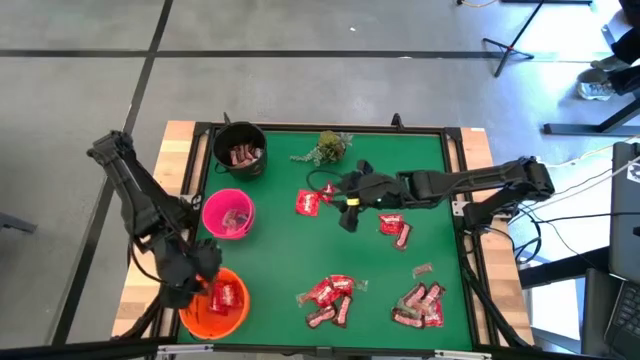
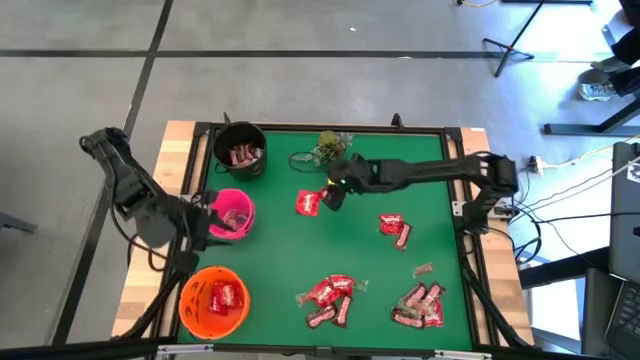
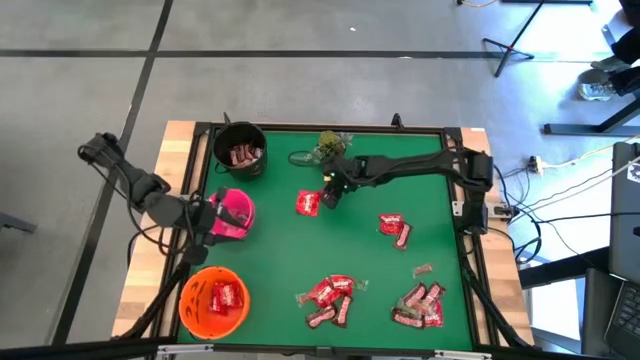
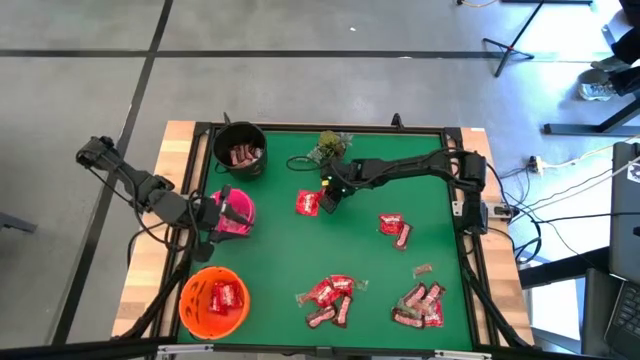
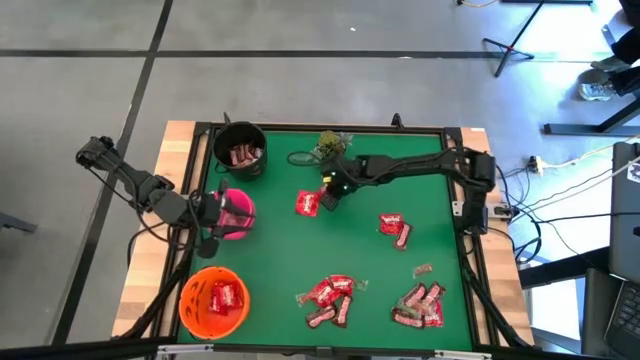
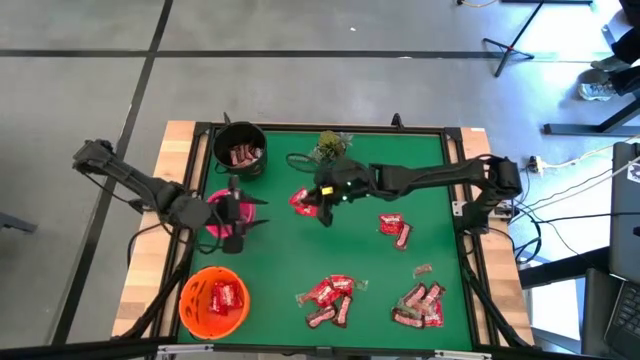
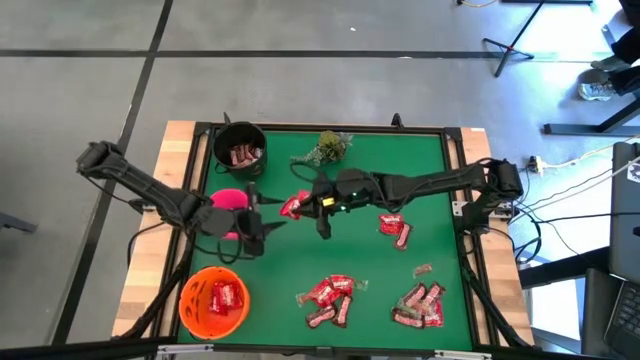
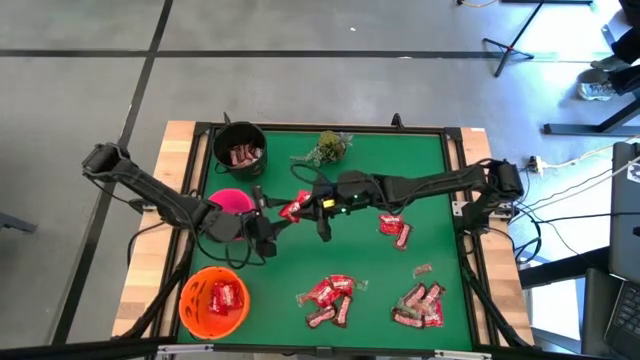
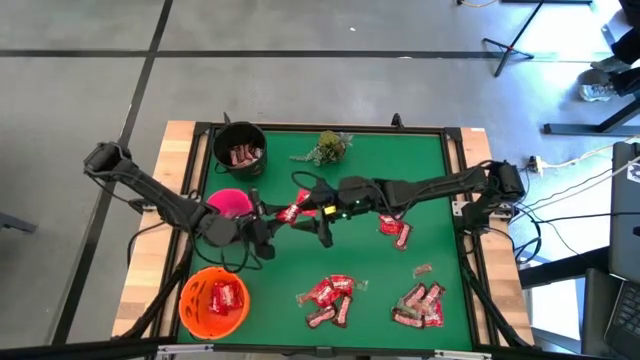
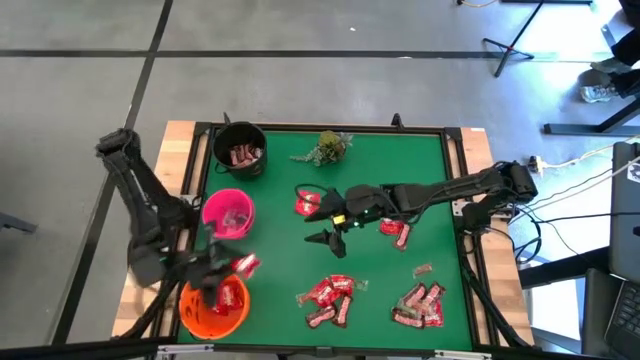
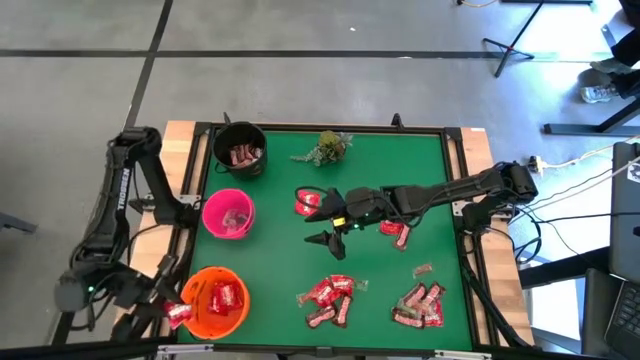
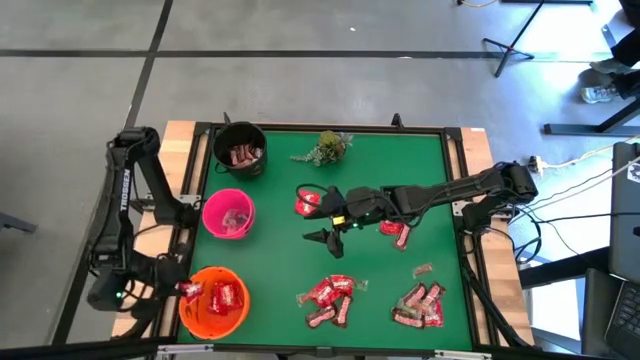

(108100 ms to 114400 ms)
Task: Sort candy
Put the red candy into the orange bucket

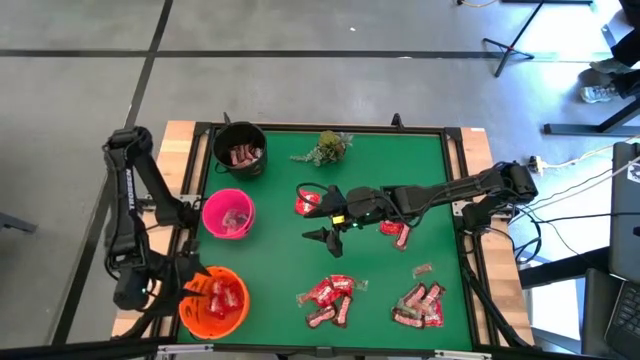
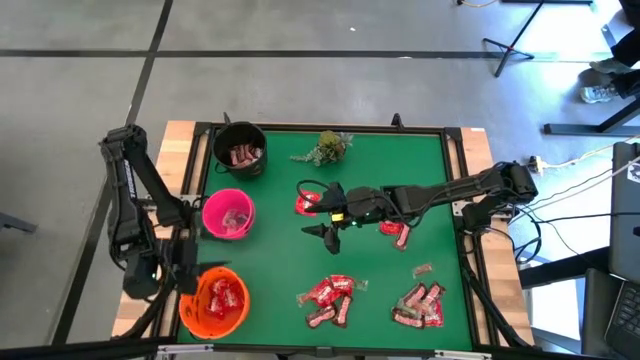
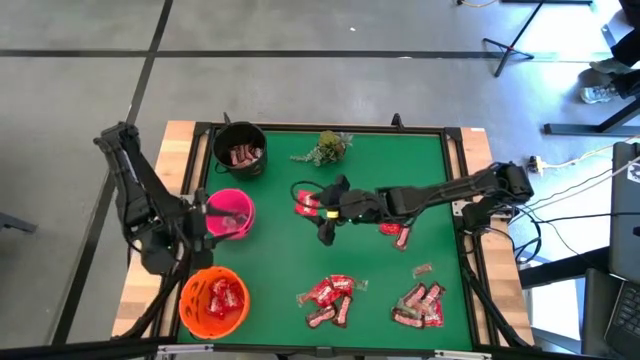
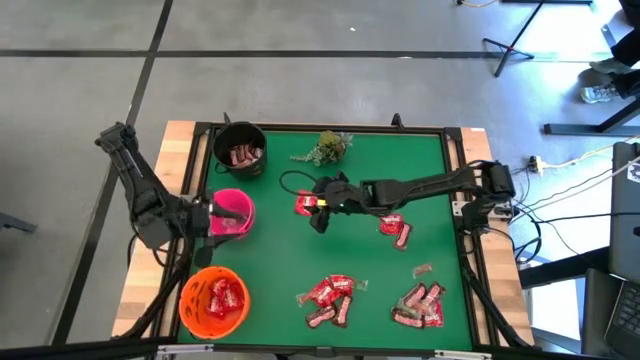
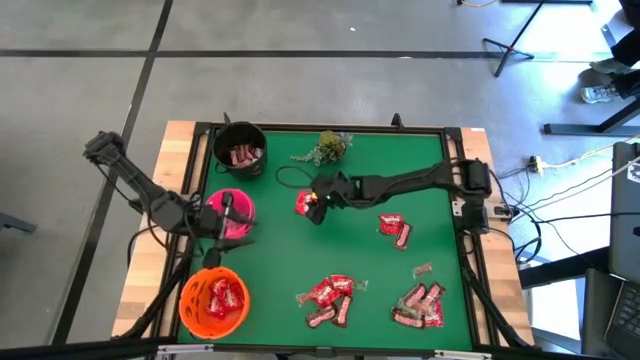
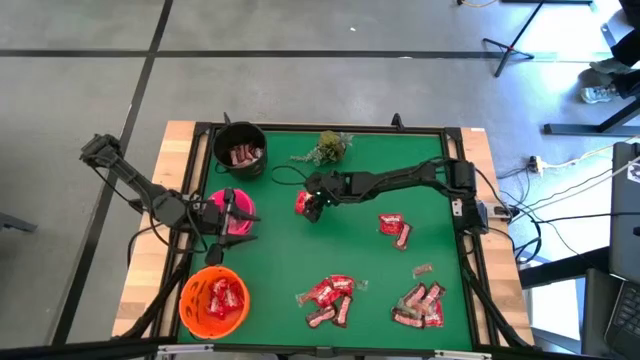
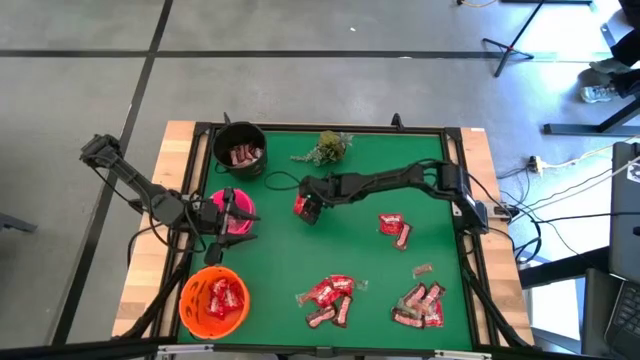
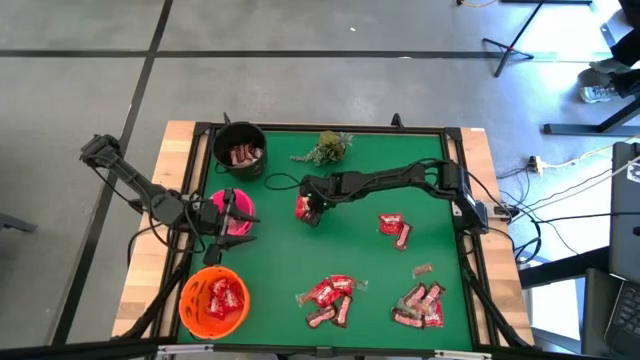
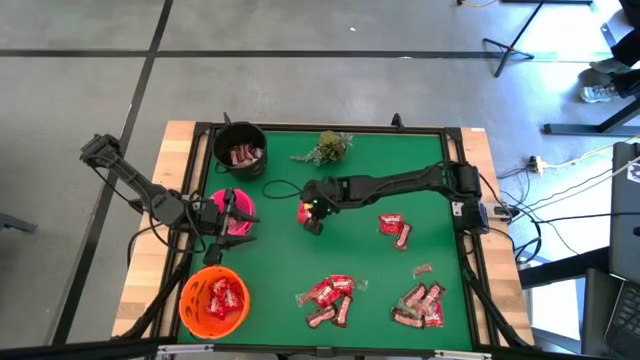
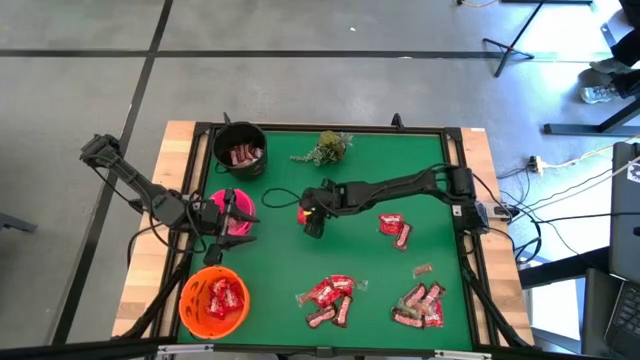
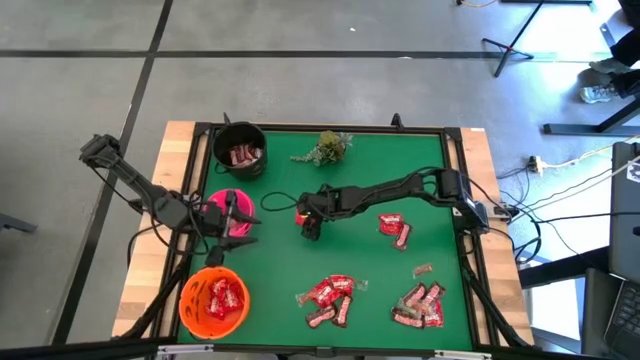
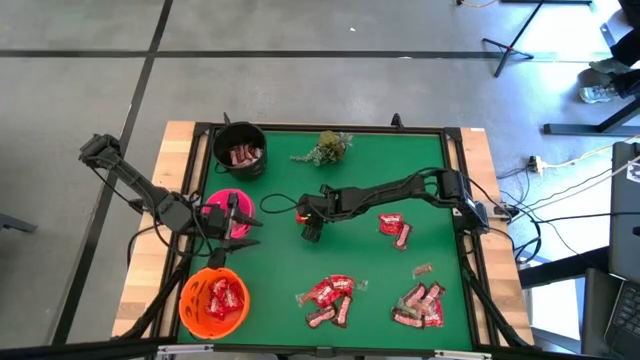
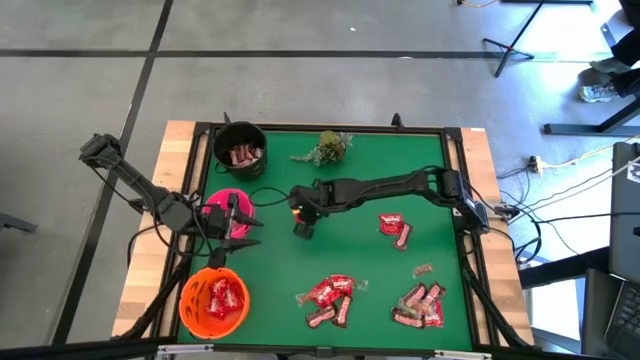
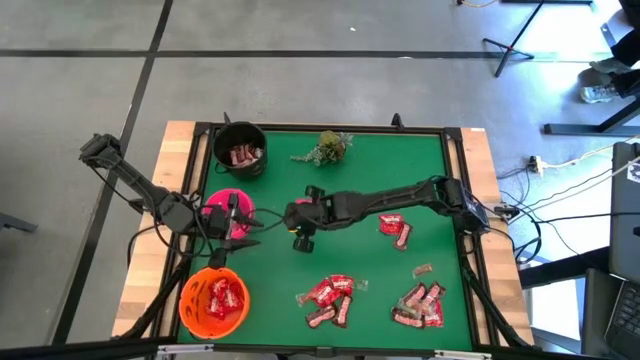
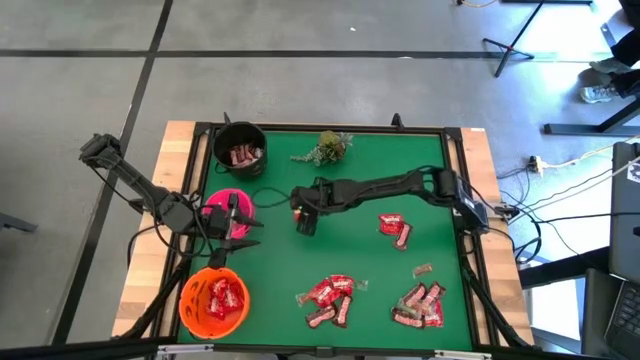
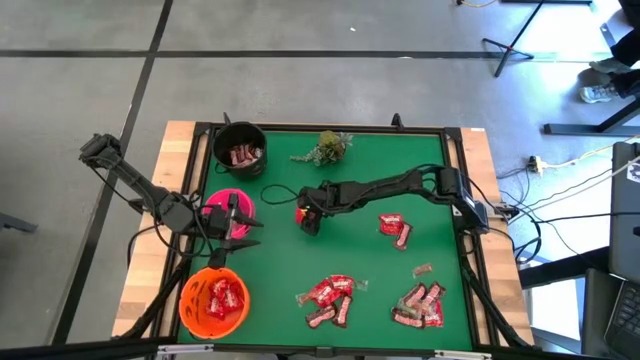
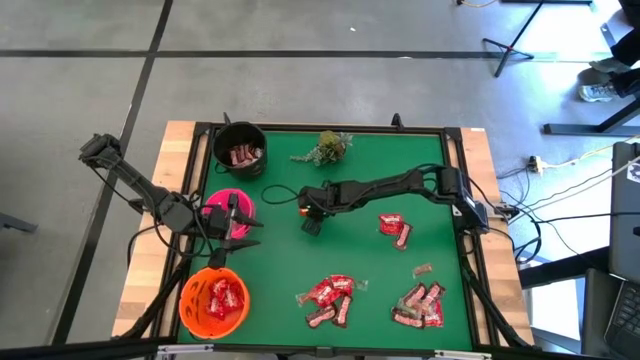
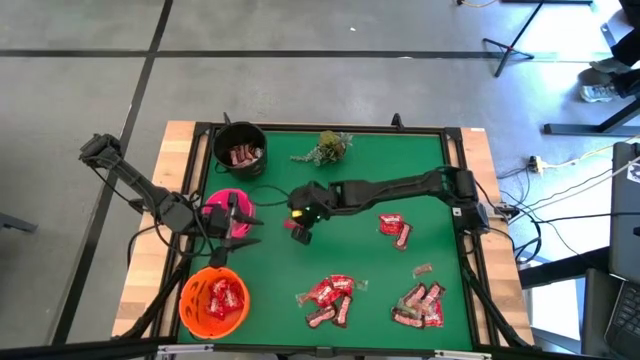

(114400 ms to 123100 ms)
Put the red candy into the orange bucket

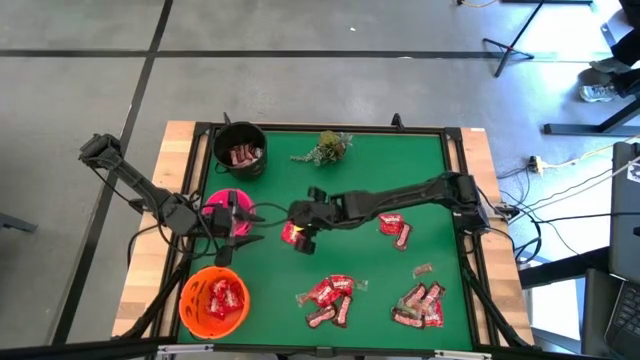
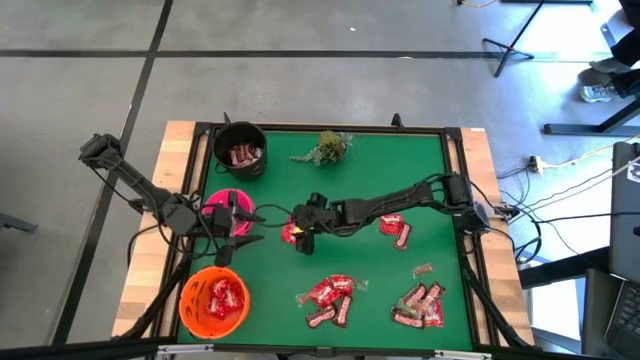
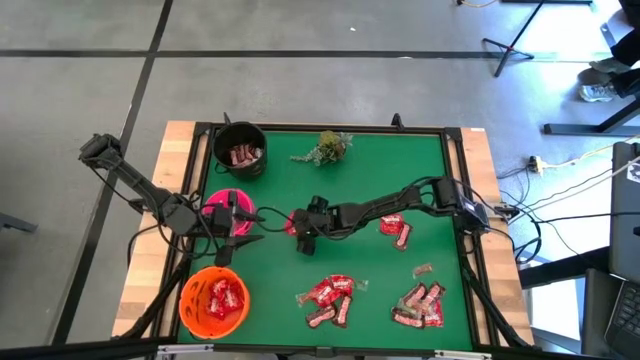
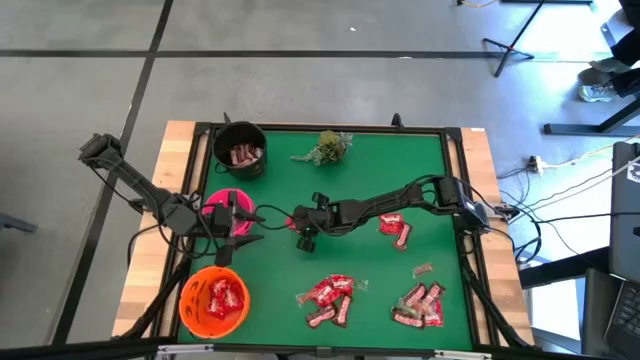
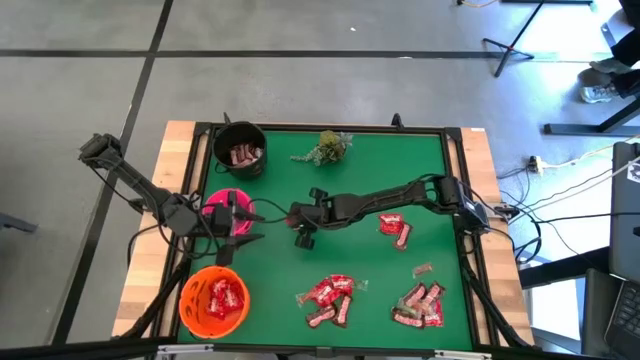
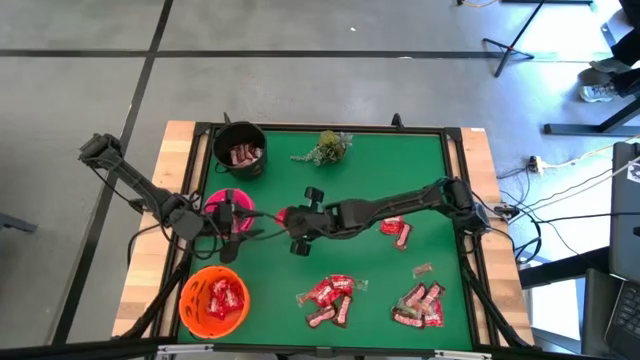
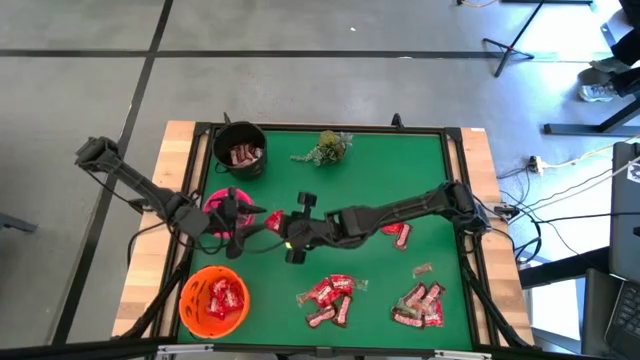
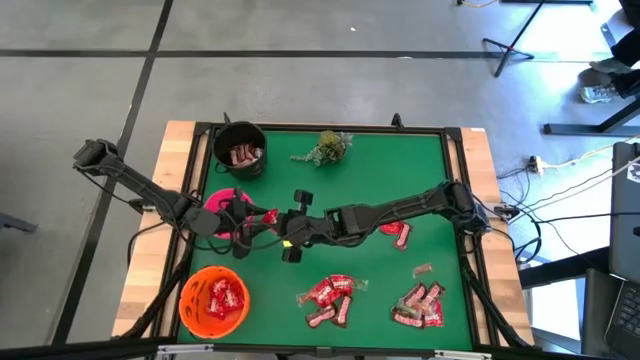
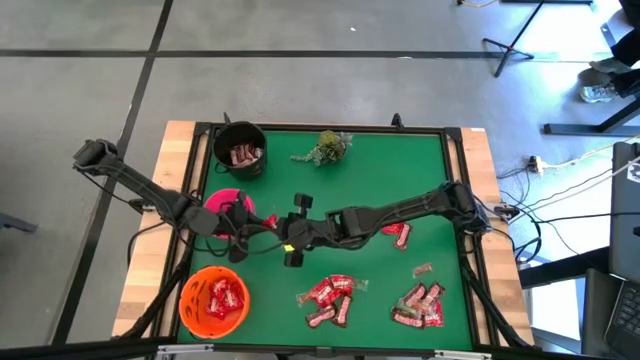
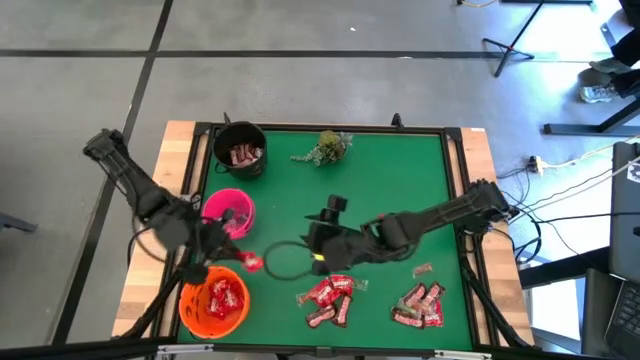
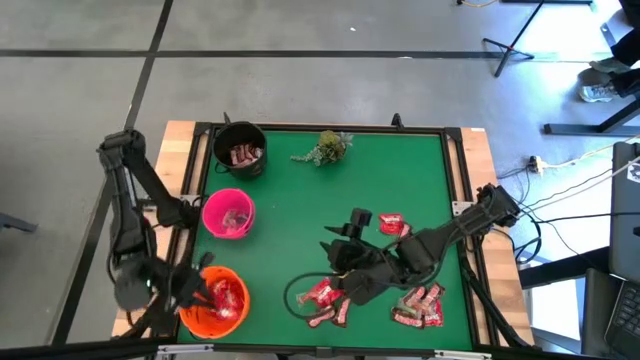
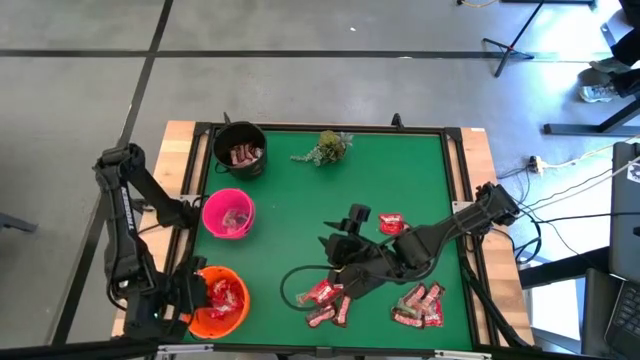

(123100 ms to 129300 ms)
Put the red candy into the orange bucket
